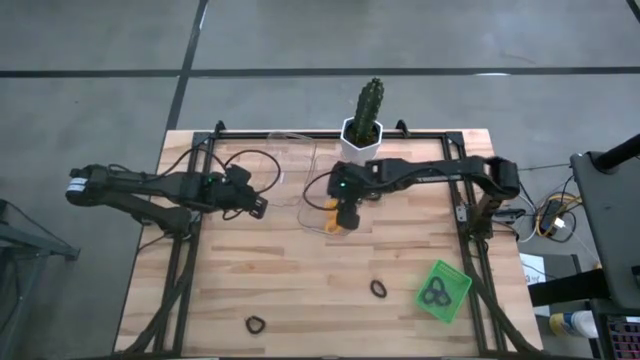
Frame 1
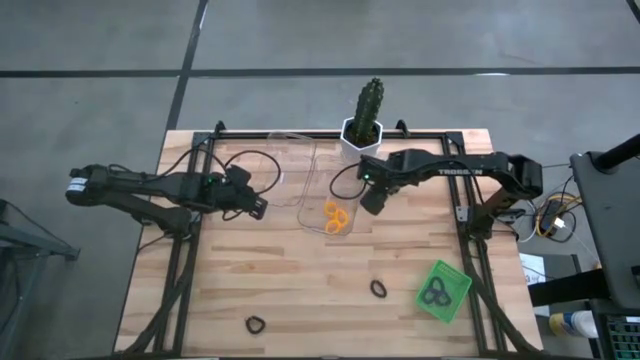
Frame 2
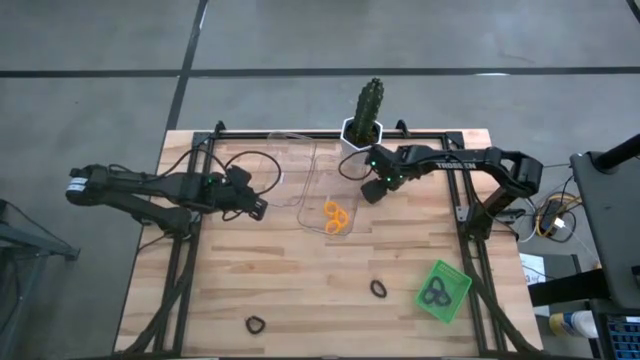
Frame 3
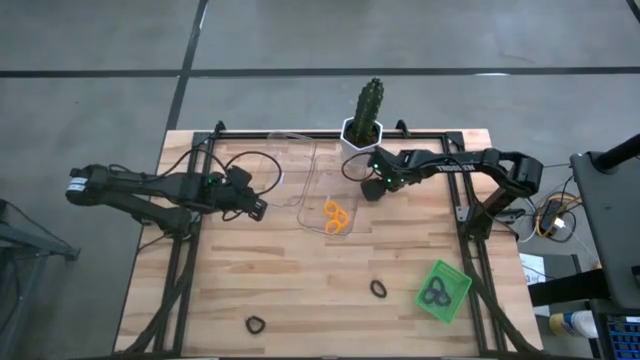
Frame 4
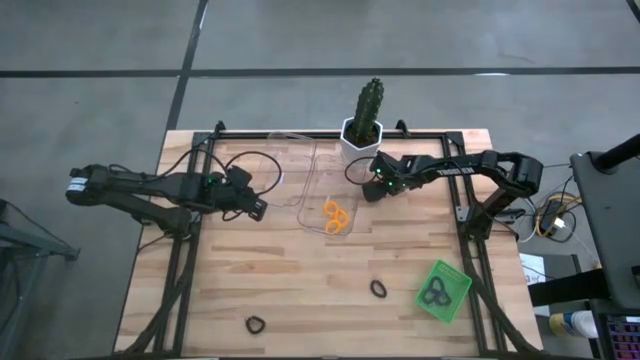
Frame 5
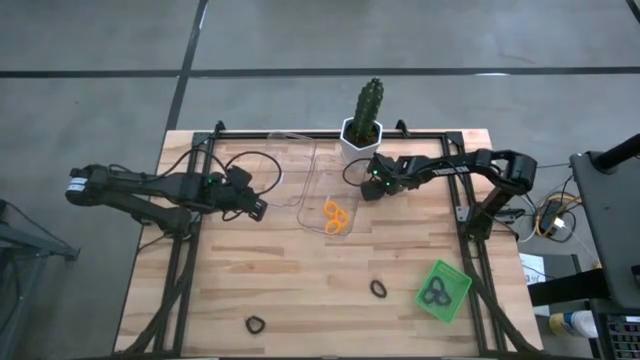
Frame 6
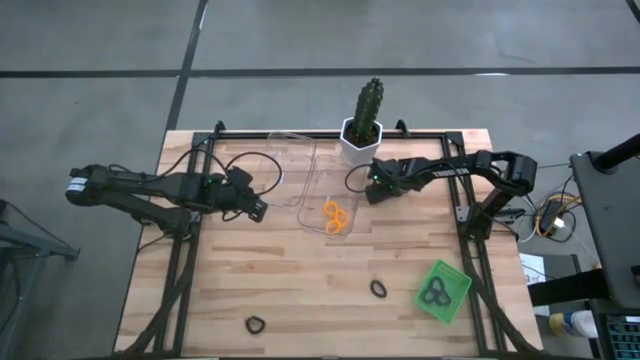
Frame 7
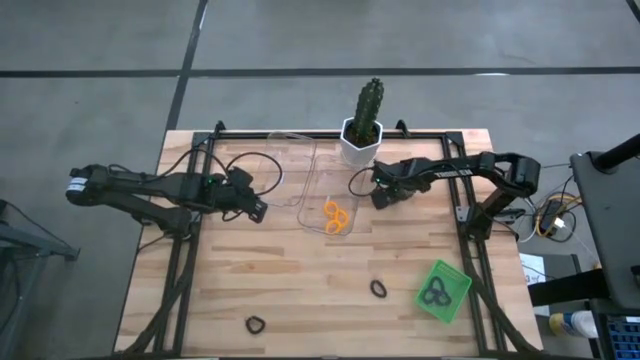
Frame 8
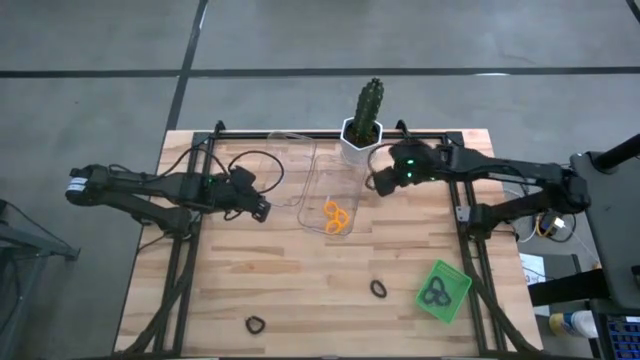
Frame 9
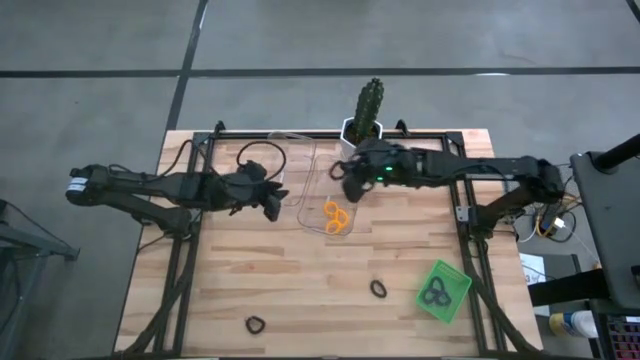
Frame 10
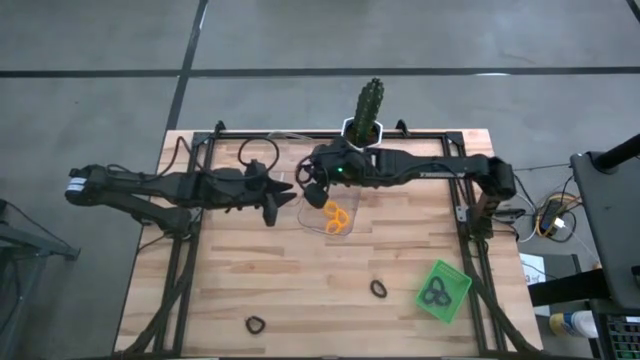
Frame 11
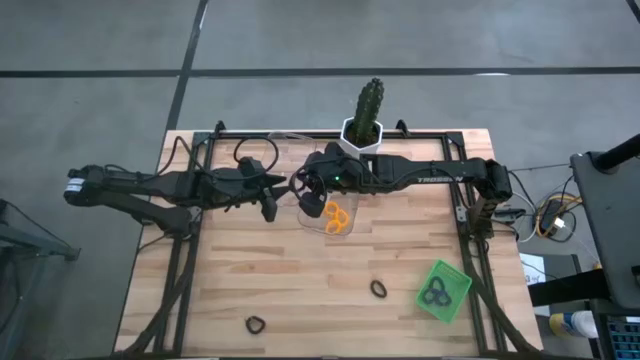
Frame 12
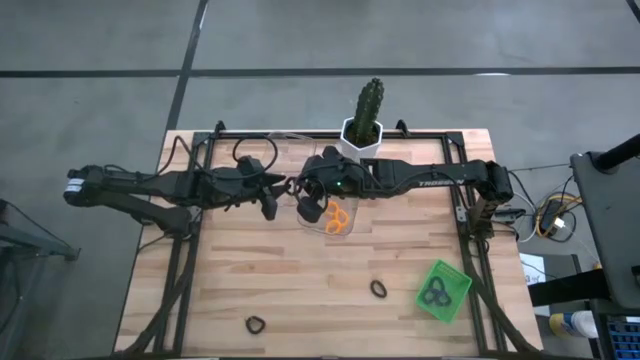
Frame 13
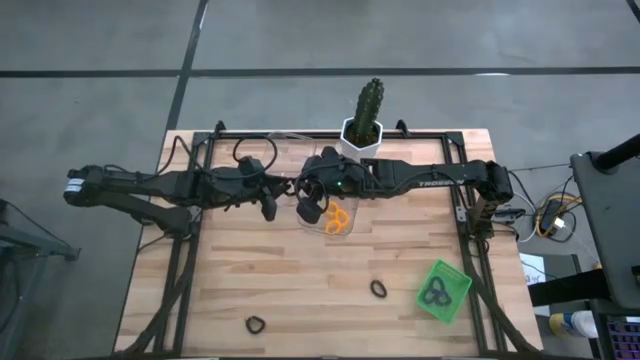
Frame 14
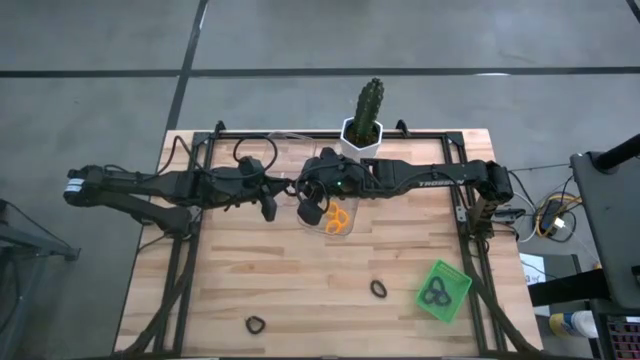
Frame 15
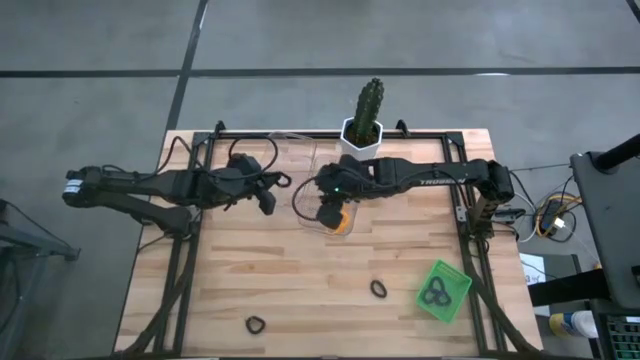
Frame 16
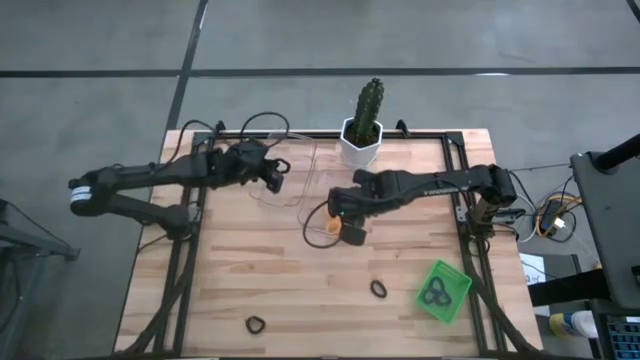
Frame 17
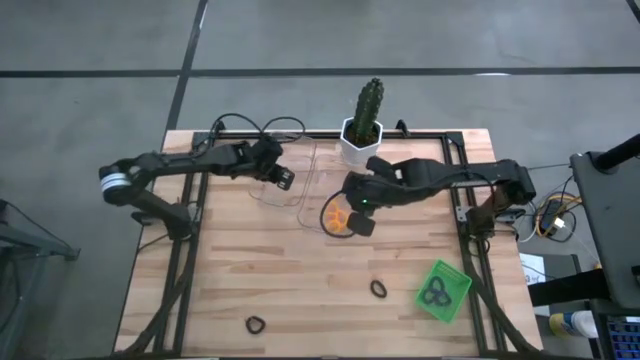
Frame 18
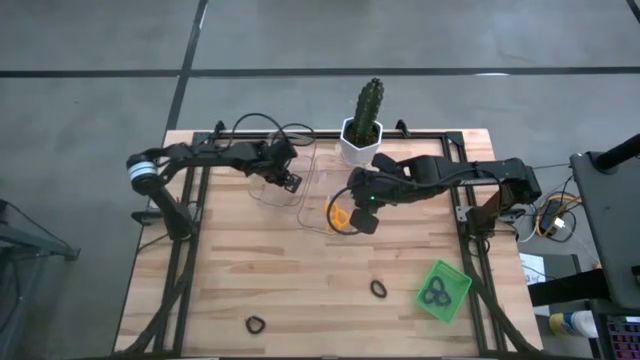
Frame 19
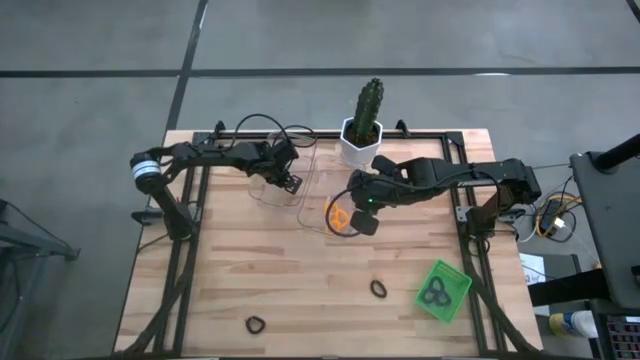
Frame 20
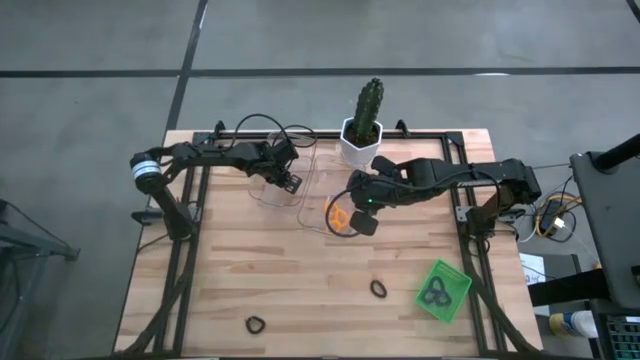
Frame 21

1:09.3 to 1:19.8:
Task: Sort items
Put the top right black keychain into the left transparent bin

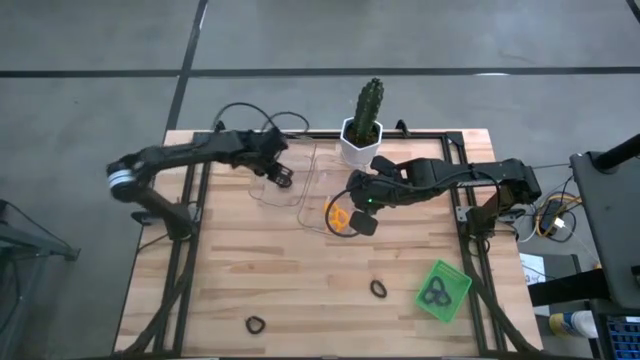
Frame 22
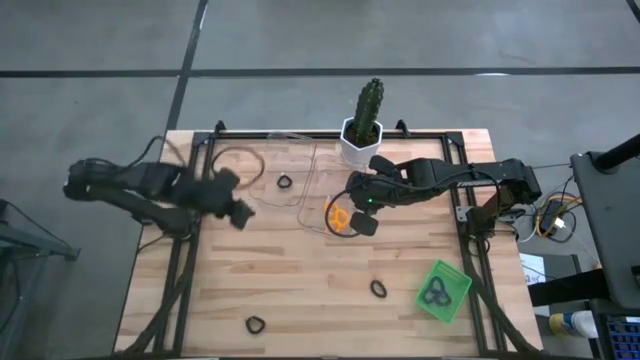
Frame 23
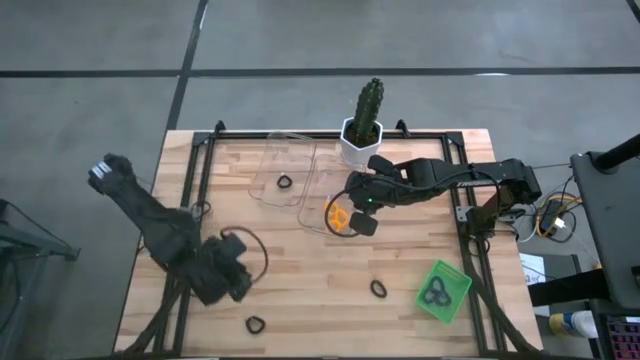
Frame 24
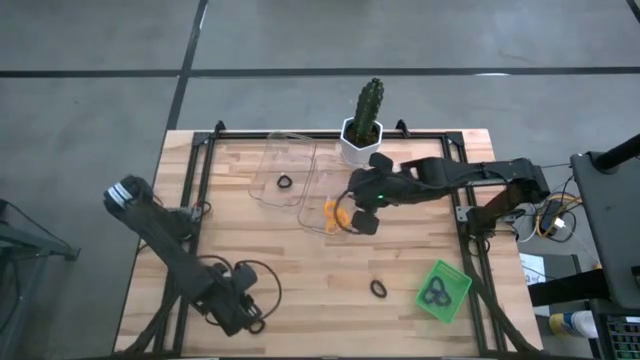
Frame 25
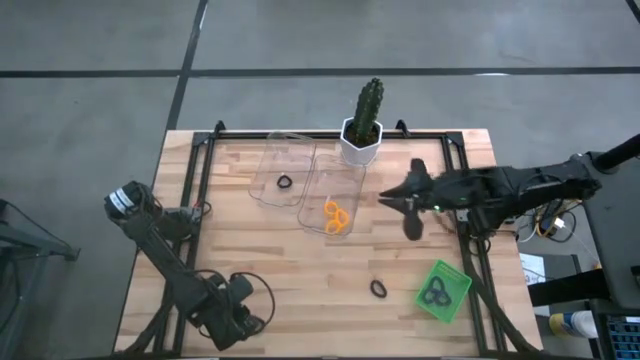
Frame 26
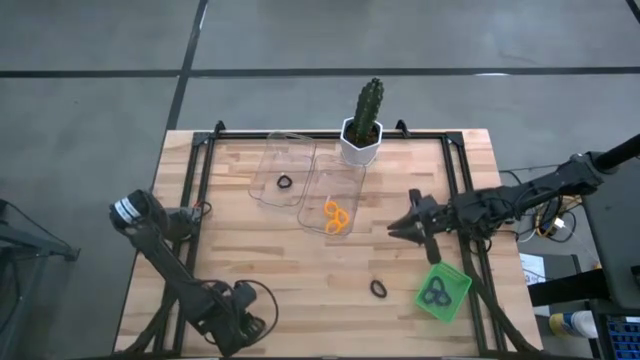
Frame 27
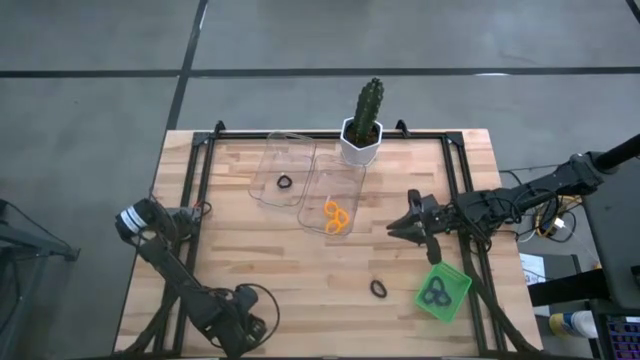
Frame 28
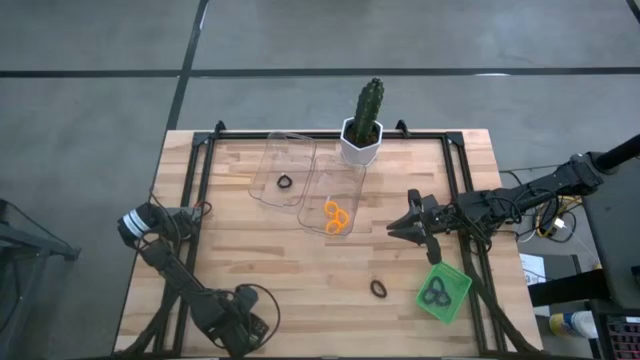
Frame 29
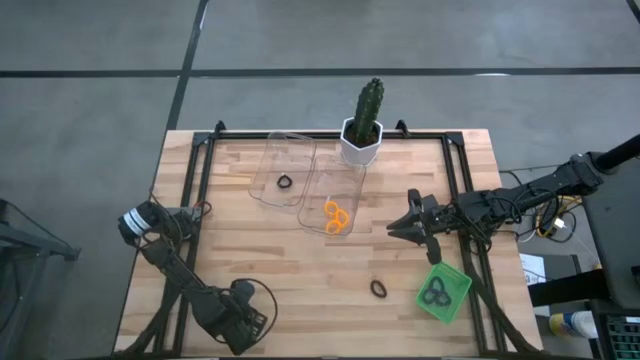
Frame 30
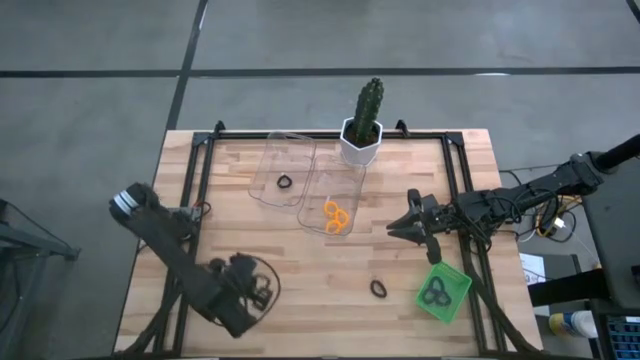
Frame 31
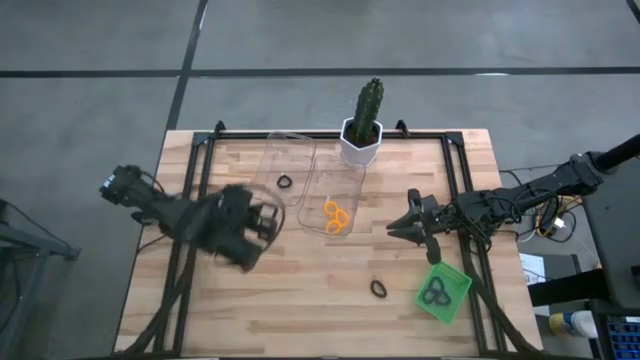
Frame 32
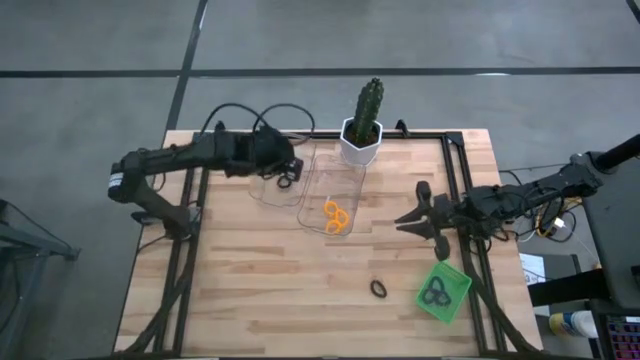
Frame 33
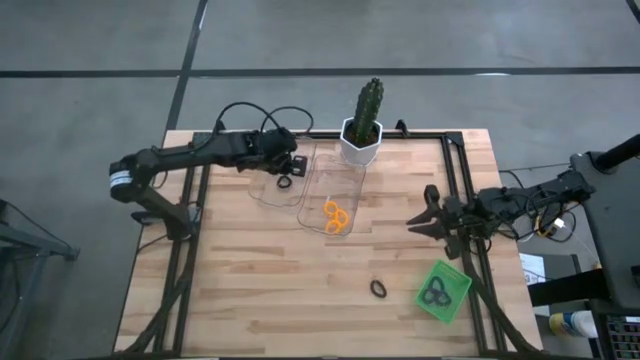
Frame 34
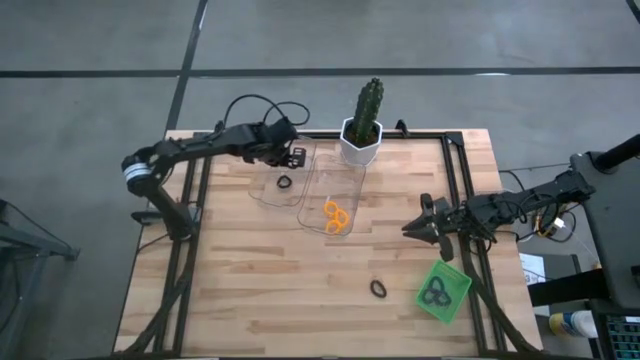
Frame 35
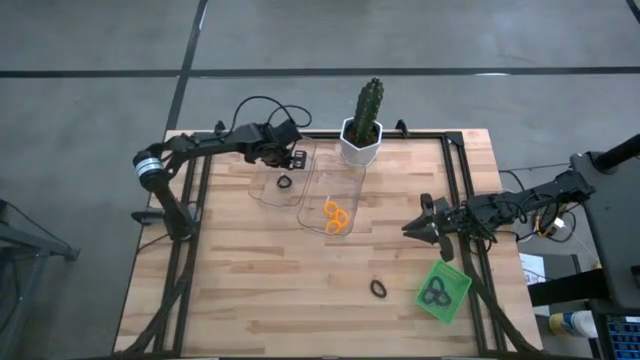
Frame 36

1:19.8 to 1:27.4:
Put the left black keychain into the left transparent bin

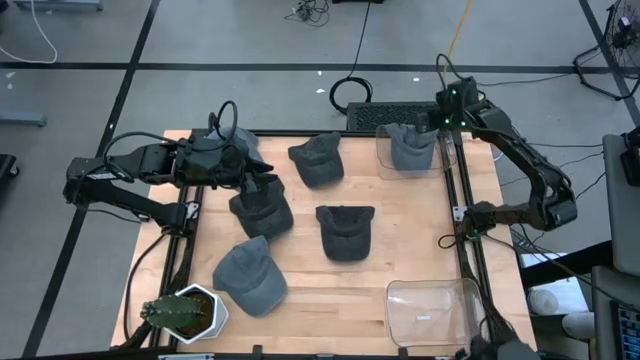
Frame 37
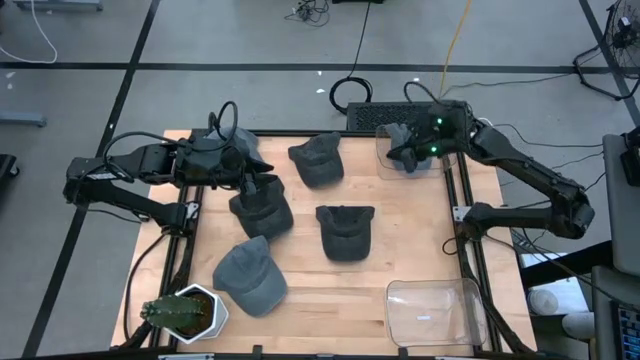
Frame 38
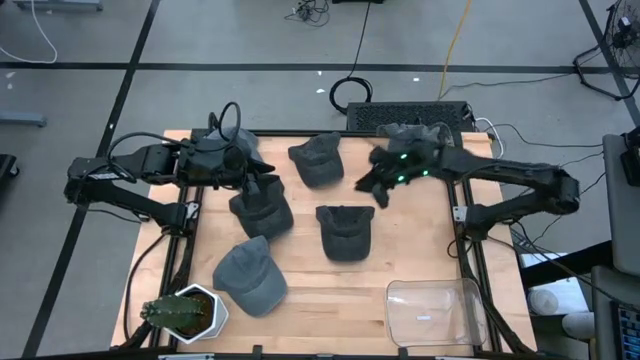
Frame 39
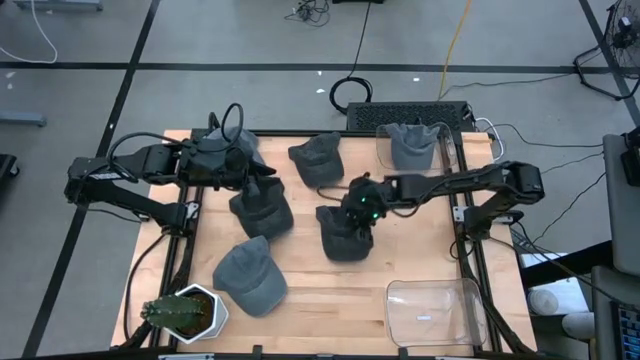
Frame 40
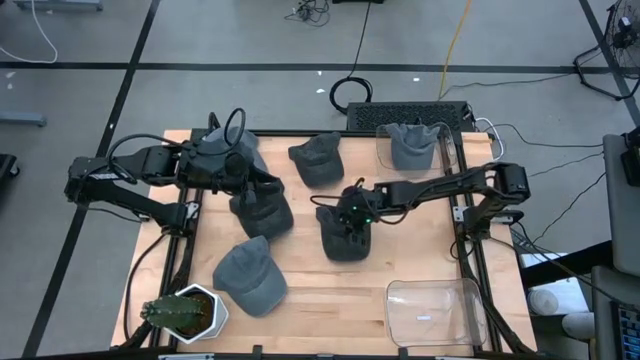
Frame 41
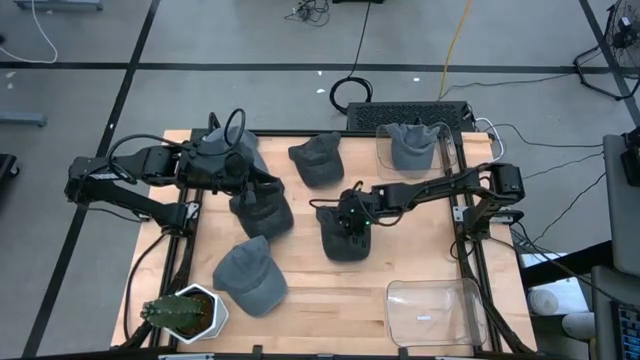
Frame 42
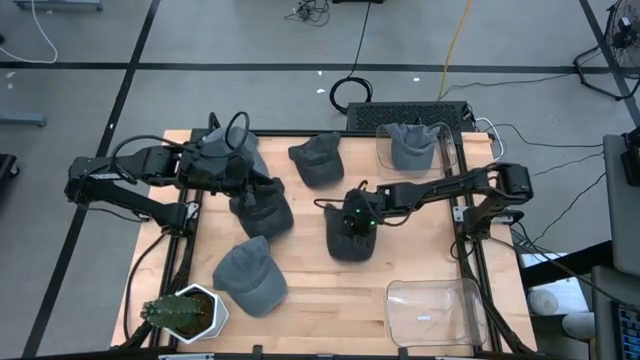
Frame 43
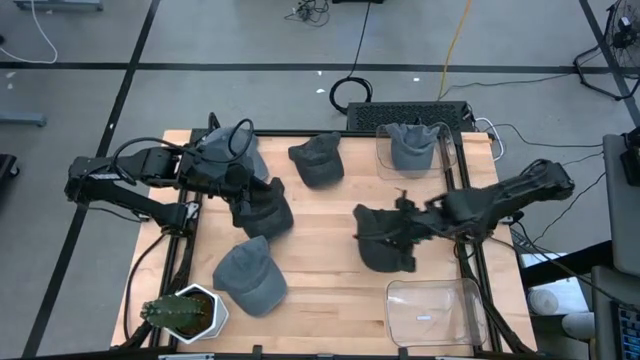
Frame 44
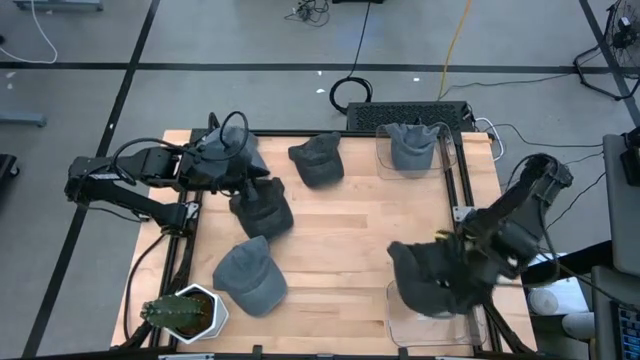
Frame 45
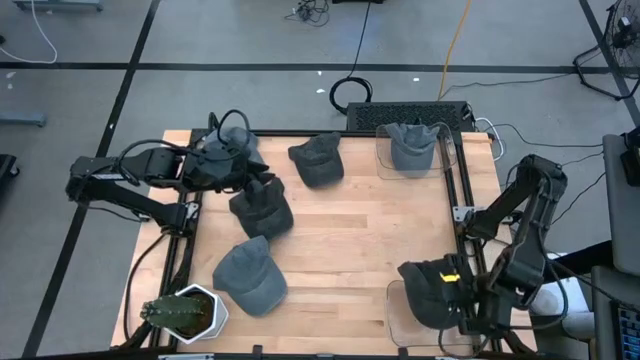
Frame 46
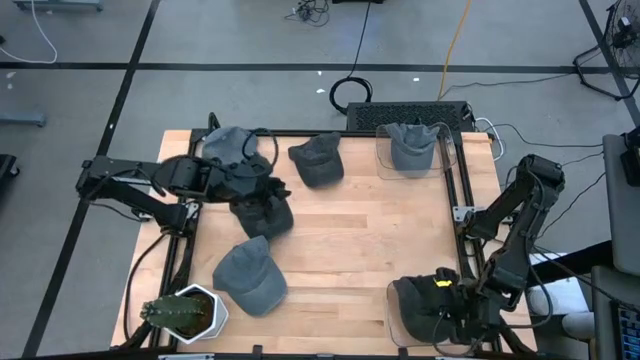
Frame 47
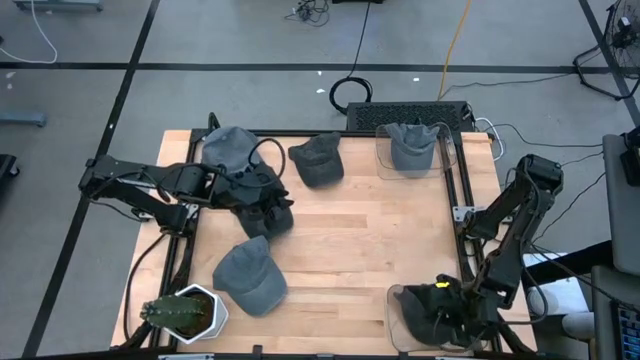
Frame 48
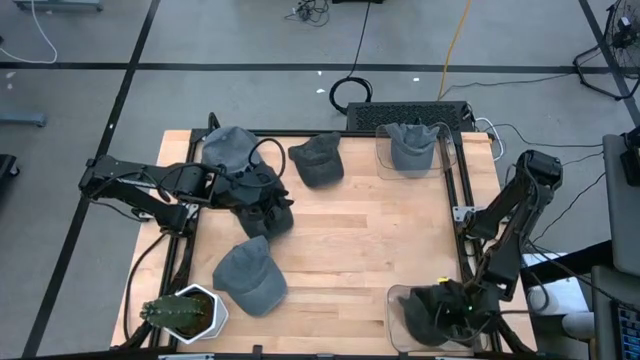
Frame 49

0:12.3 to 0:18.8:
Task: Pick & Place hat
Put the bottom black cap into the bottom transparent bin
